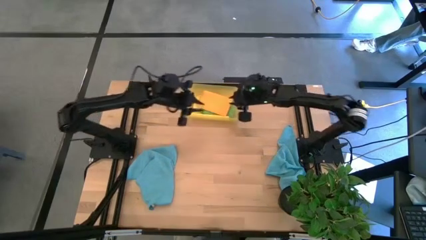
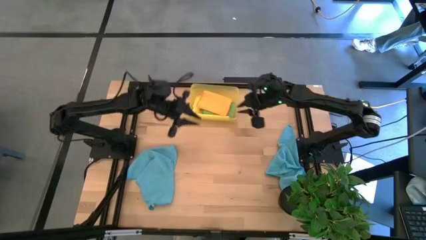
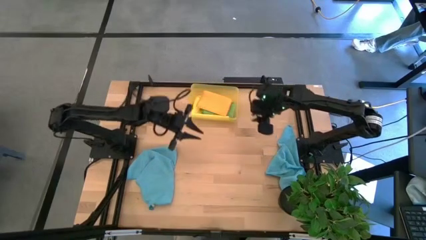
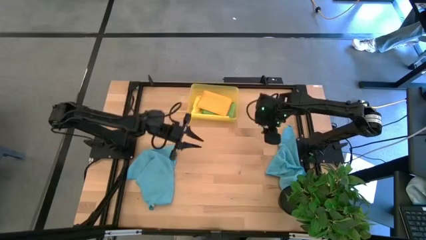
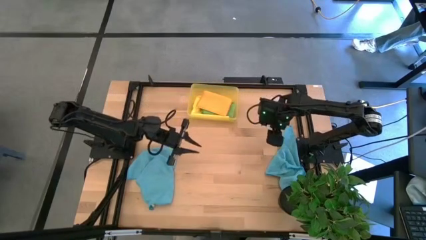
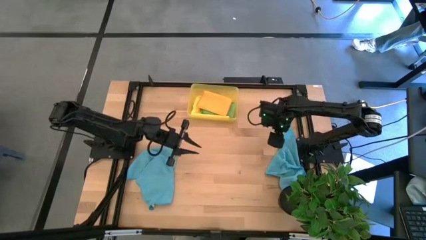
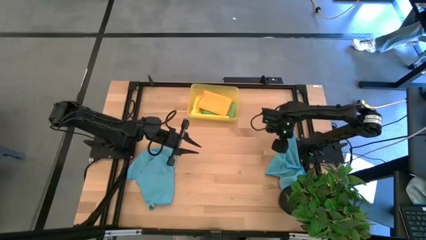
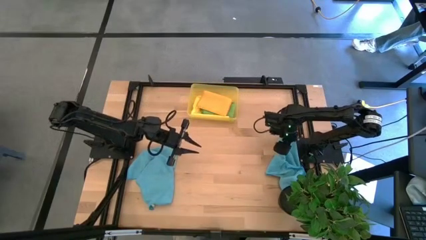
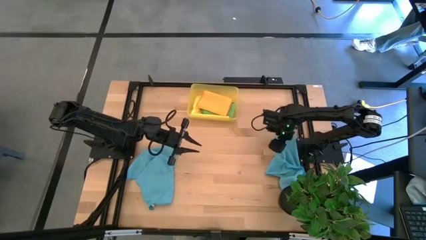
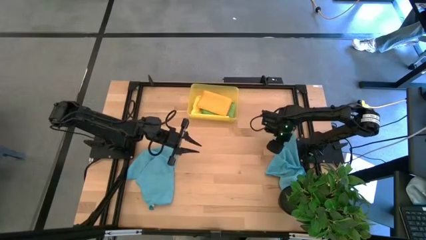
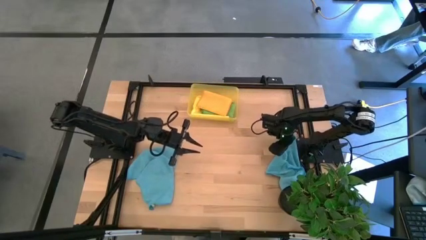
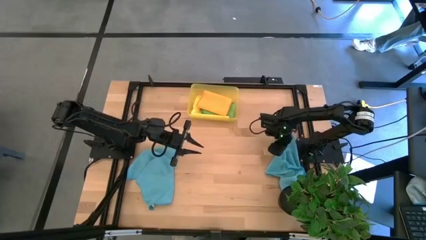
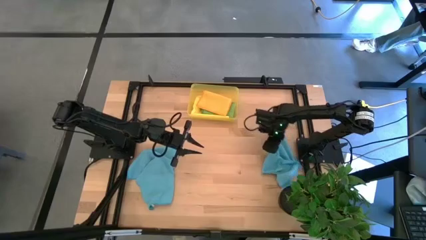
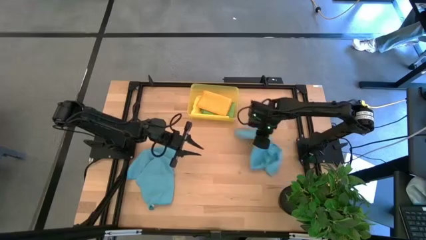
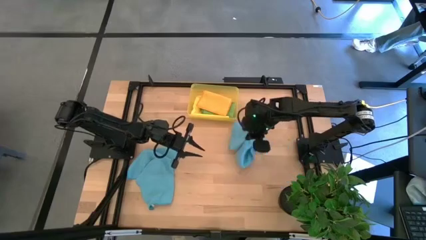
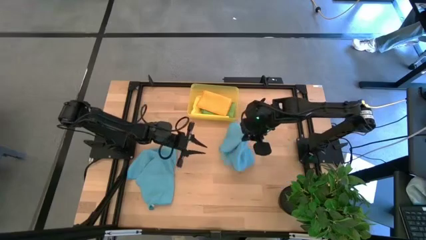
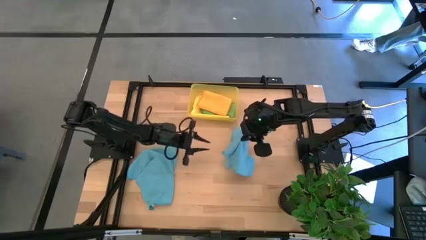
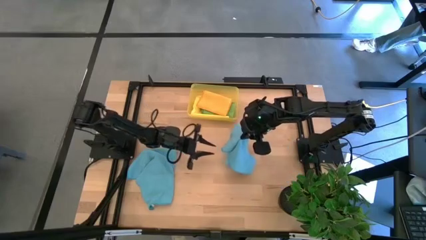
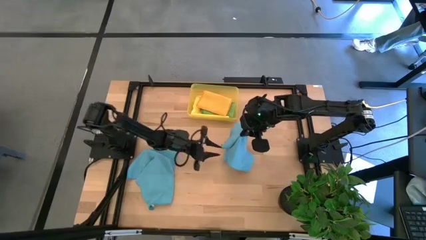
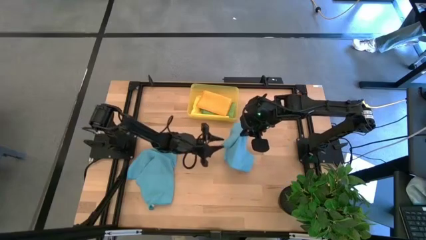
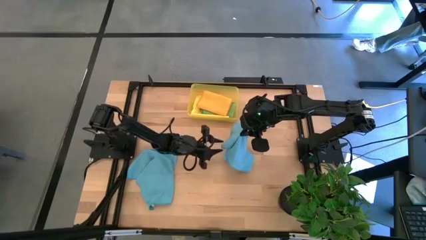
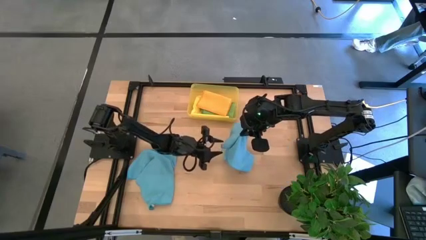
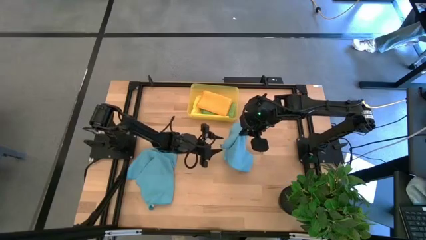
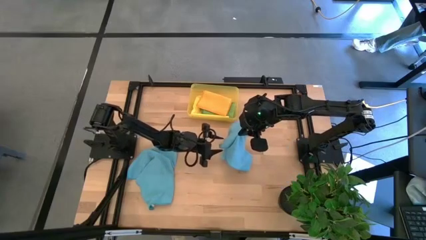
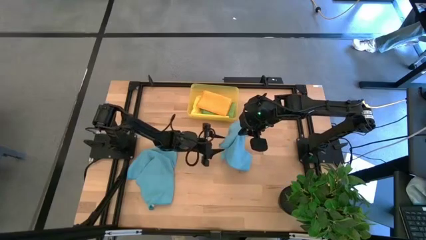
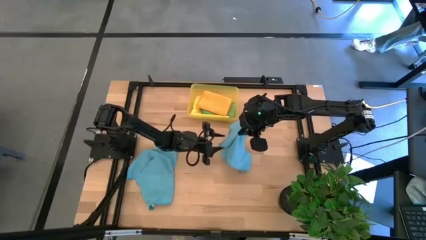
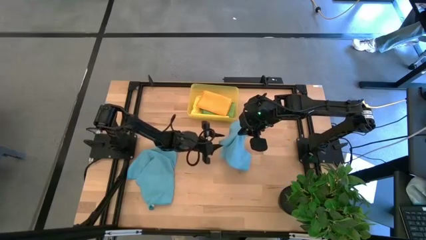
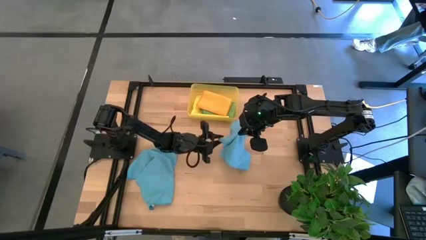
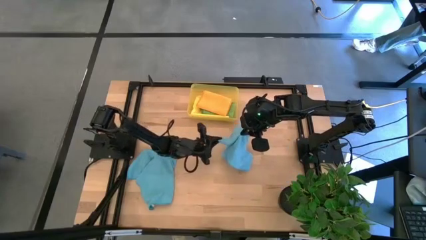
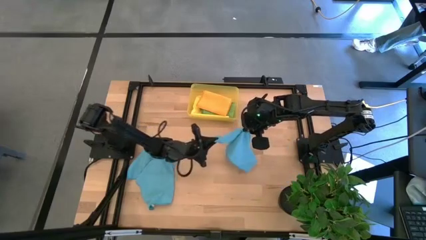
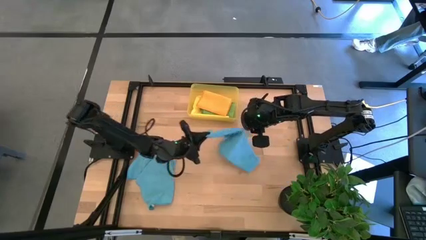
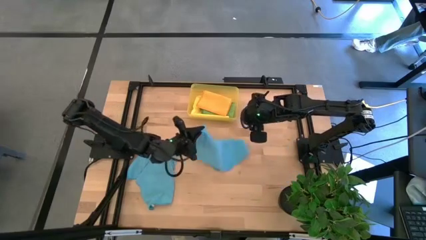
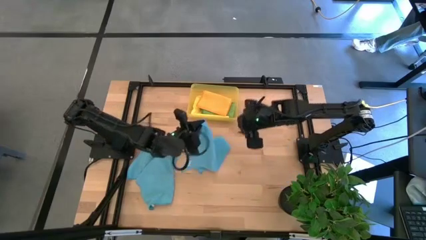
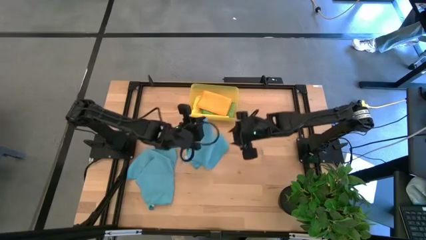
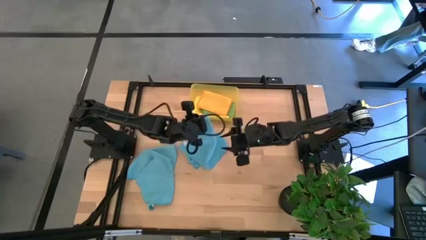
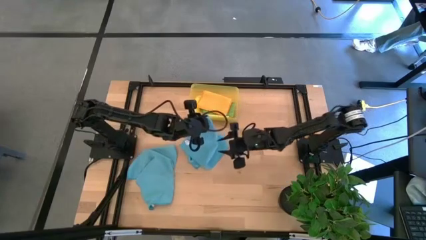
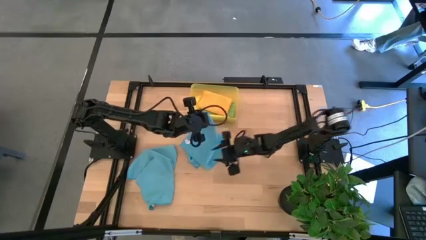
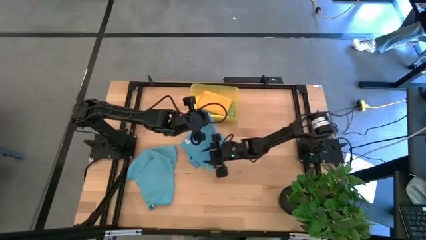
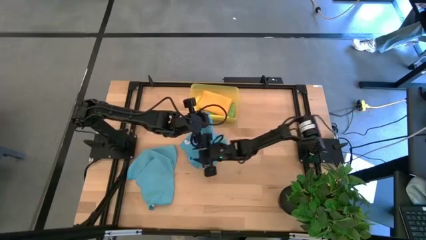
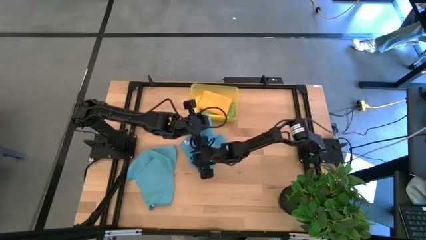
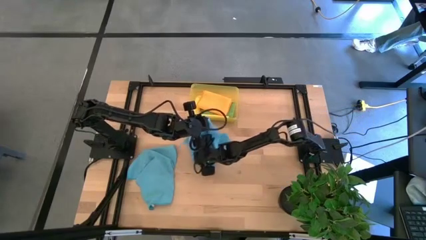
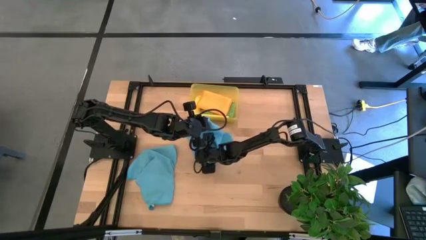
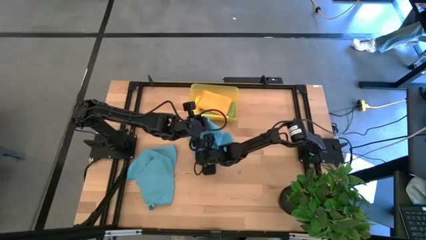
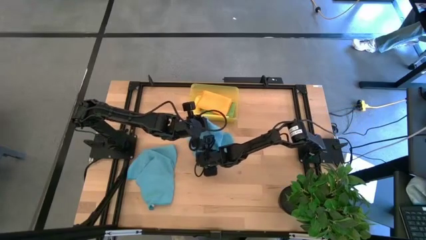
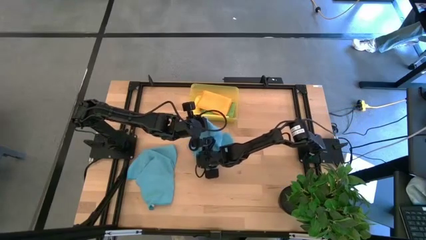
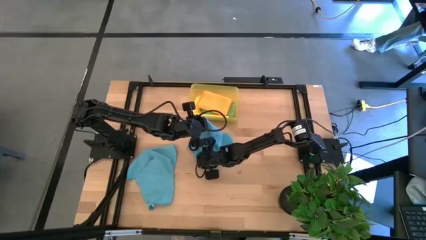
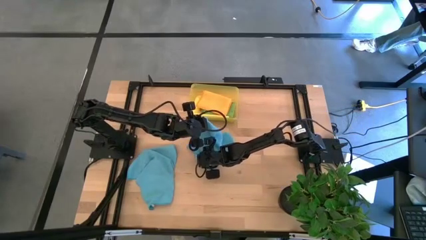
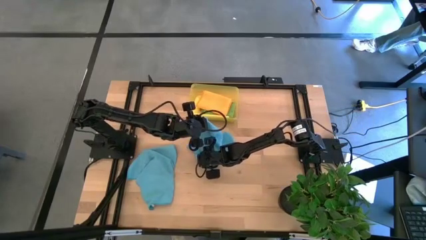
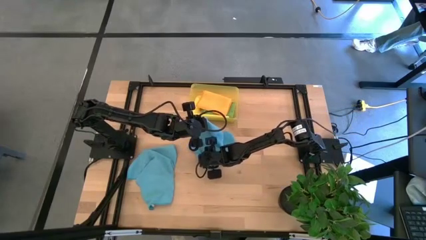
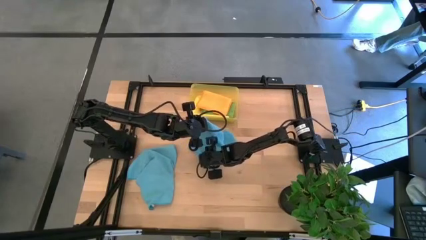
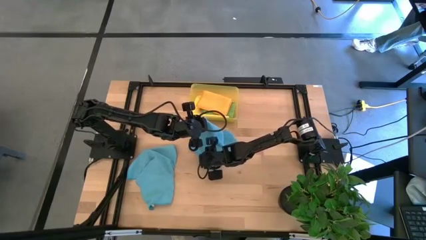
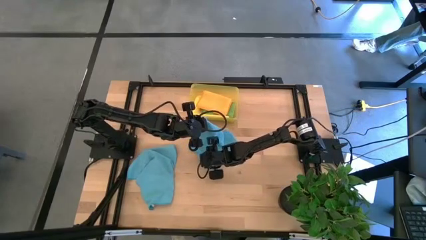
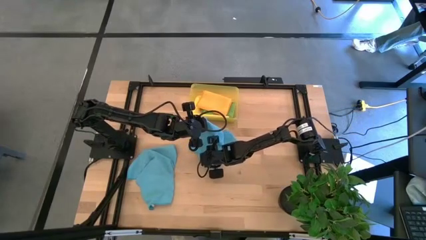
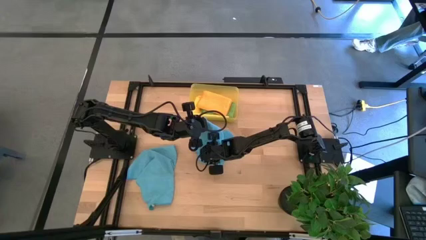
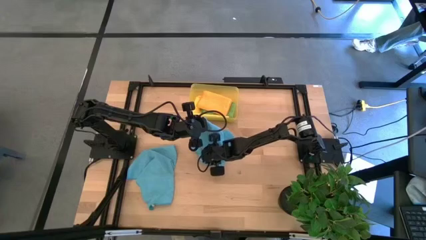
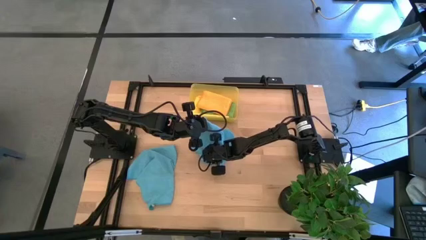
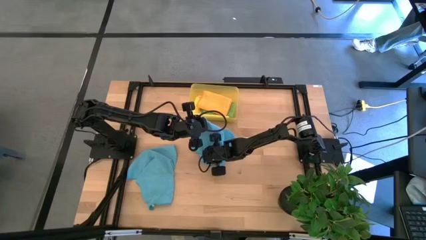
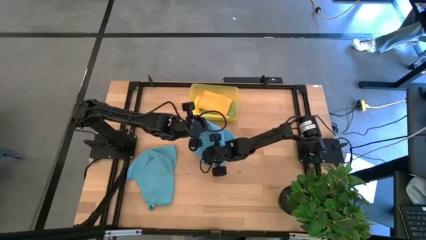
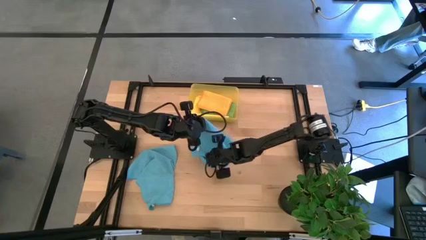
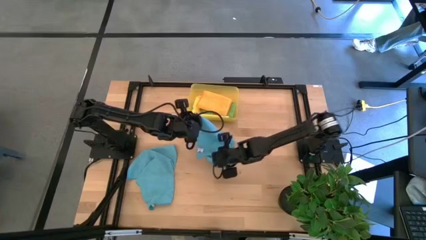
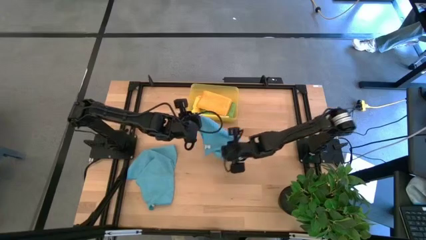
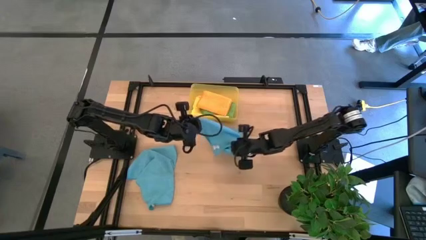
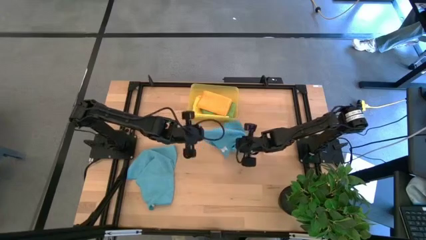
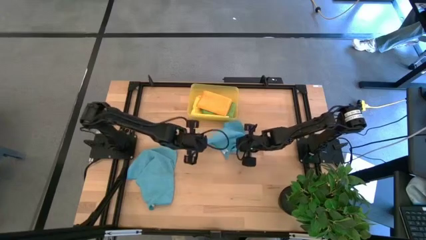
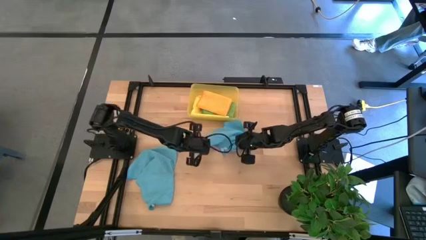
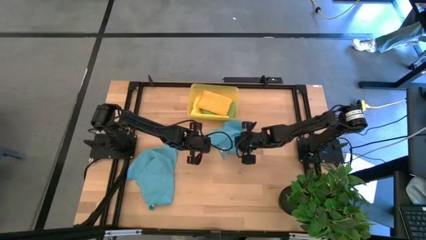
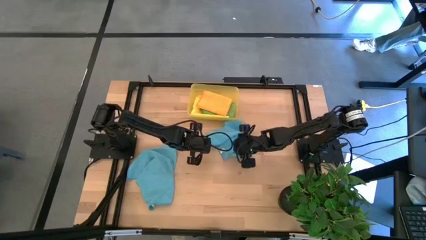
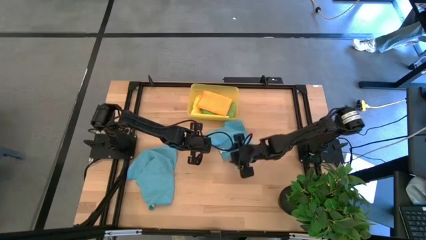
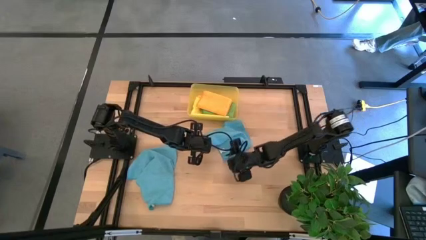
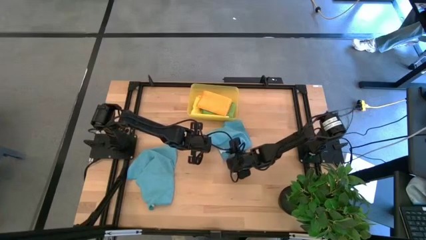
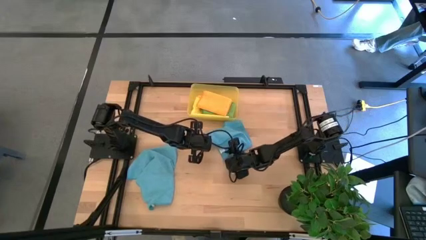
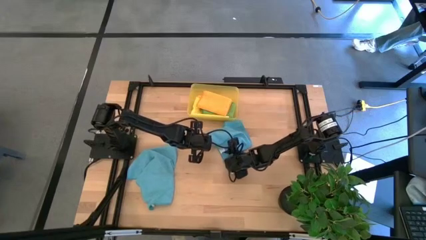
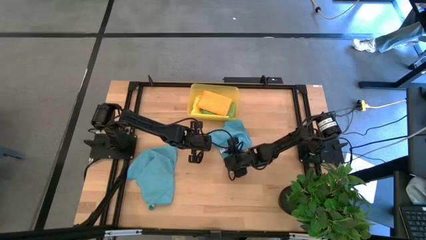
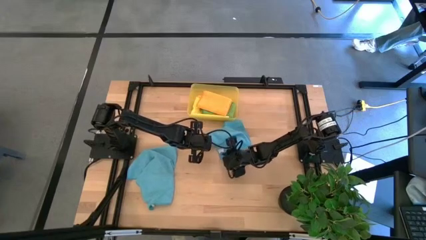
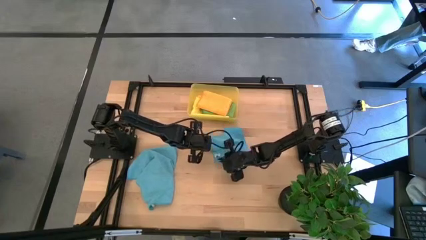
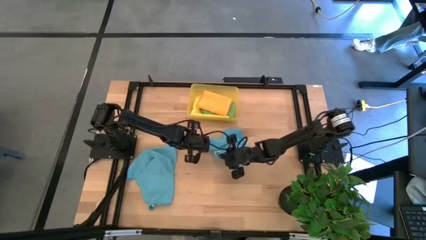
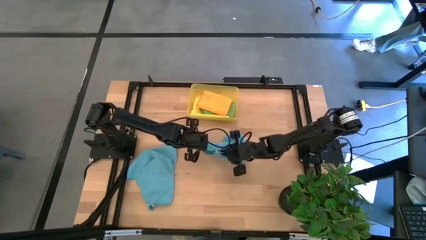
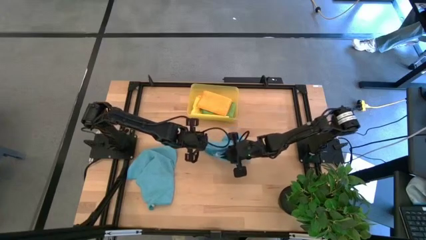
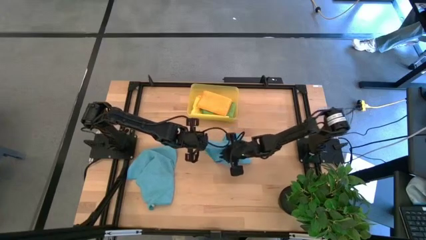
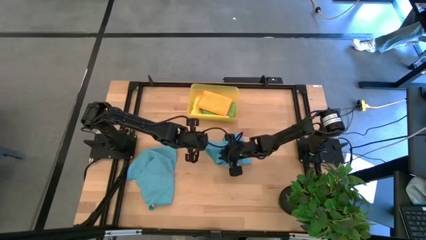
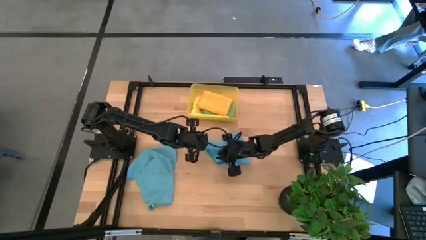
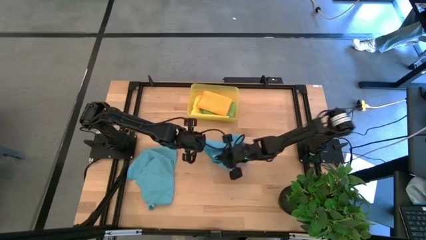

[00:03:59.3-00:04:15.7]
Task: Fold microfiber towels
Fold the right blue towel
